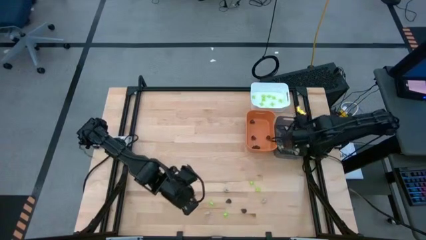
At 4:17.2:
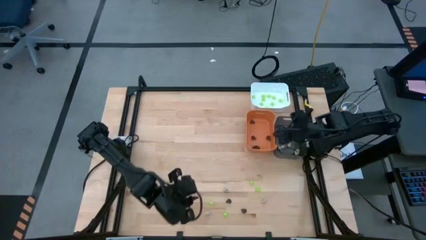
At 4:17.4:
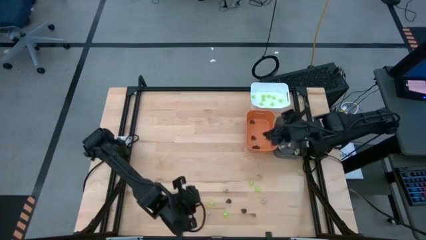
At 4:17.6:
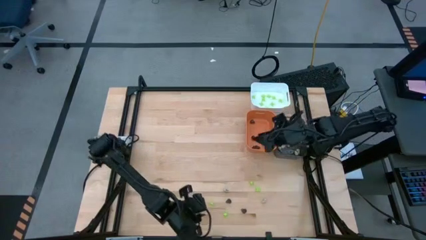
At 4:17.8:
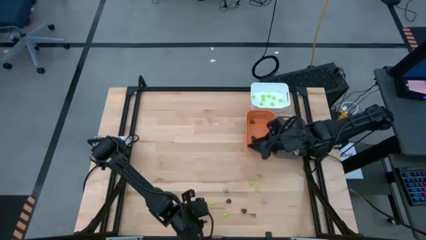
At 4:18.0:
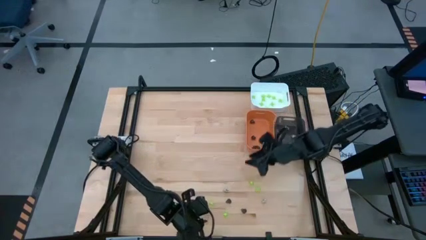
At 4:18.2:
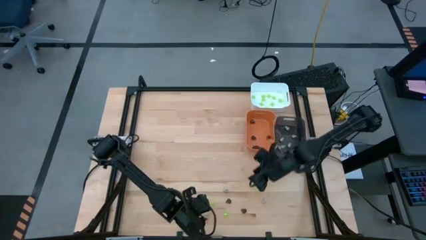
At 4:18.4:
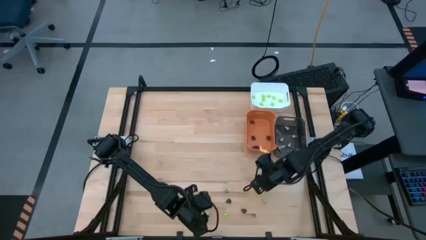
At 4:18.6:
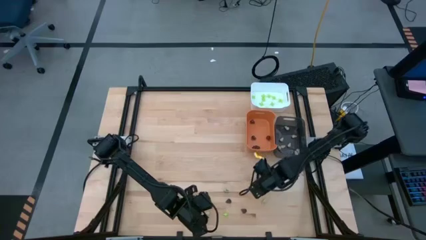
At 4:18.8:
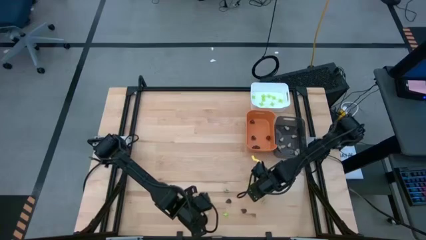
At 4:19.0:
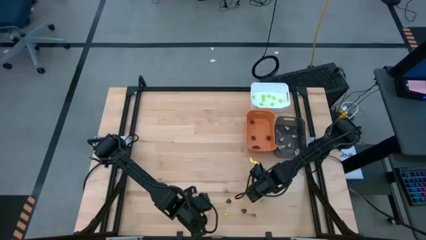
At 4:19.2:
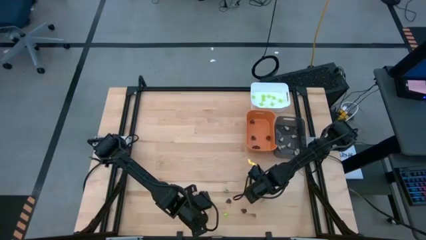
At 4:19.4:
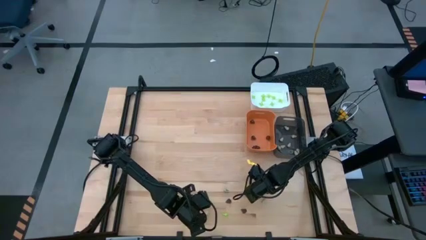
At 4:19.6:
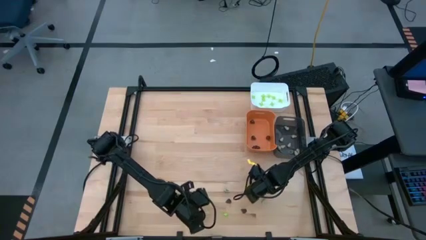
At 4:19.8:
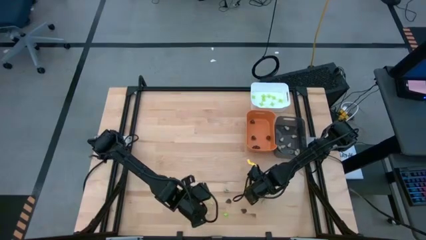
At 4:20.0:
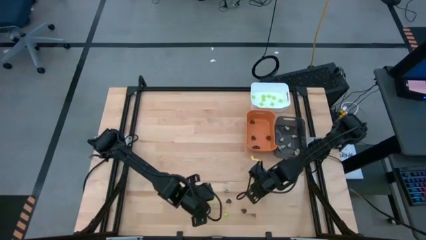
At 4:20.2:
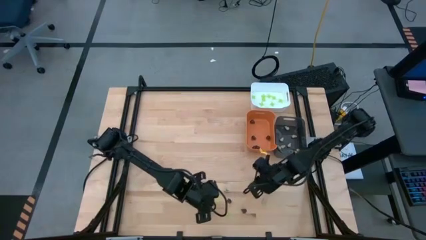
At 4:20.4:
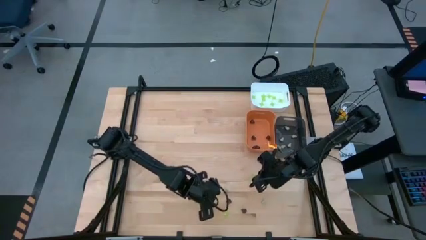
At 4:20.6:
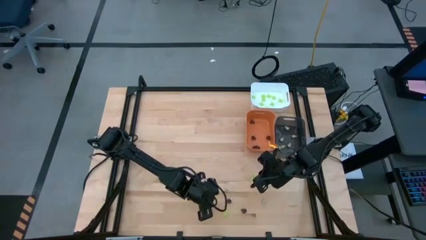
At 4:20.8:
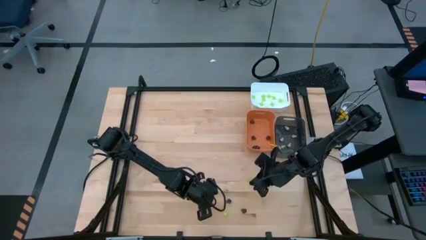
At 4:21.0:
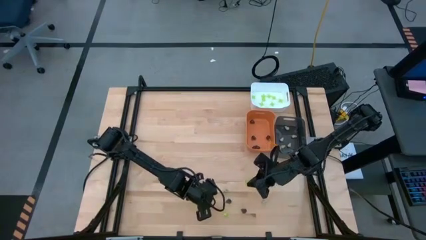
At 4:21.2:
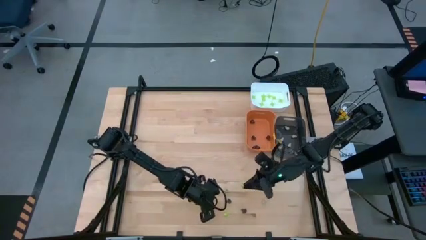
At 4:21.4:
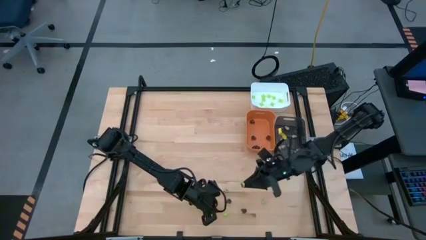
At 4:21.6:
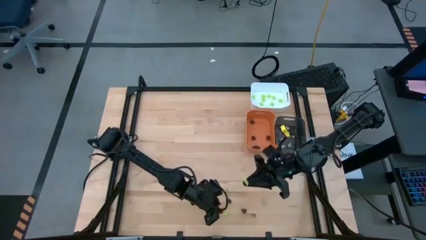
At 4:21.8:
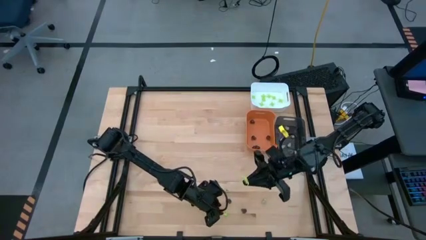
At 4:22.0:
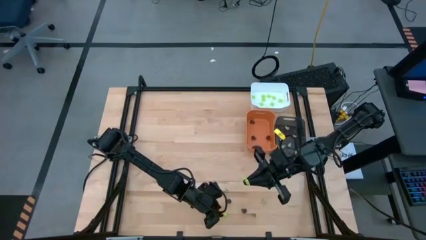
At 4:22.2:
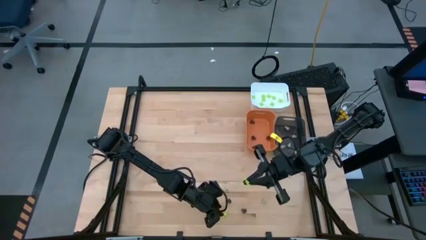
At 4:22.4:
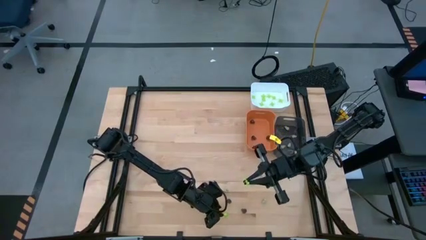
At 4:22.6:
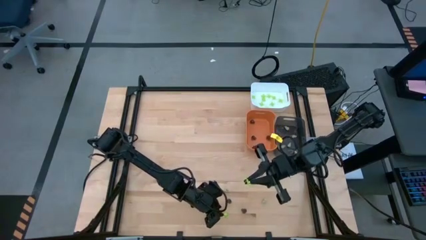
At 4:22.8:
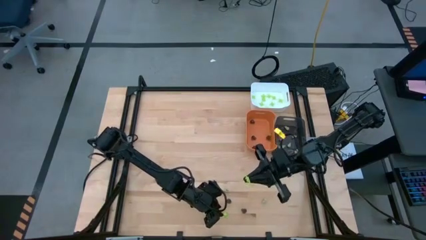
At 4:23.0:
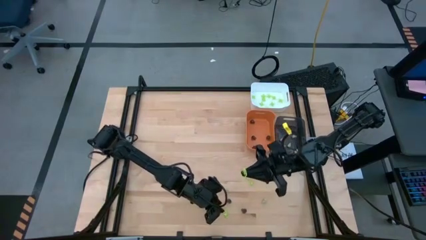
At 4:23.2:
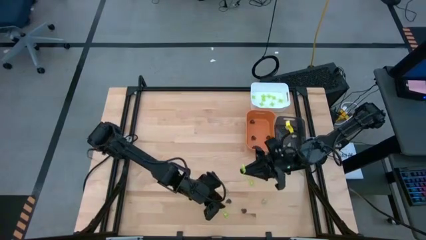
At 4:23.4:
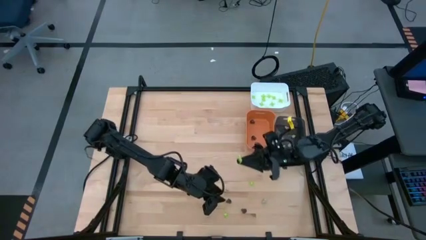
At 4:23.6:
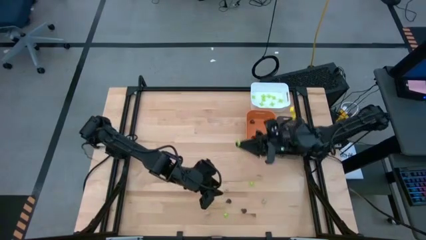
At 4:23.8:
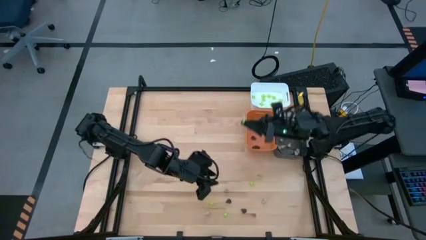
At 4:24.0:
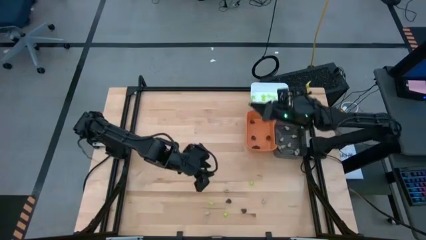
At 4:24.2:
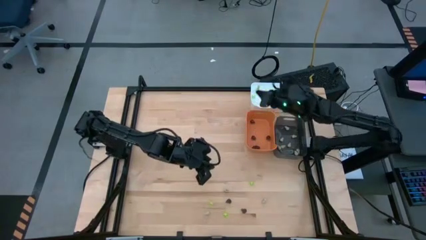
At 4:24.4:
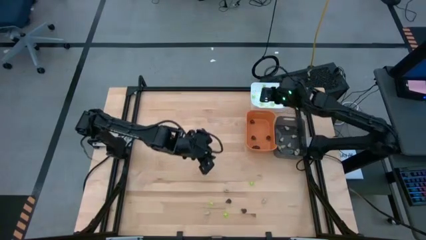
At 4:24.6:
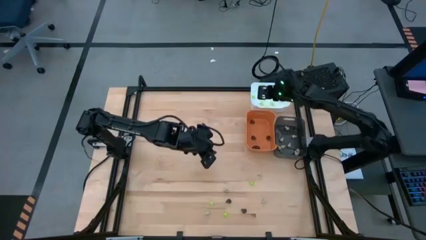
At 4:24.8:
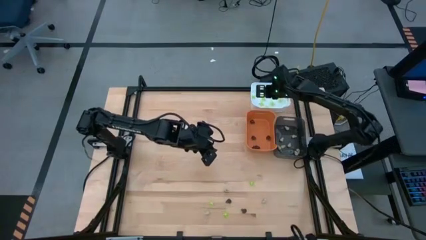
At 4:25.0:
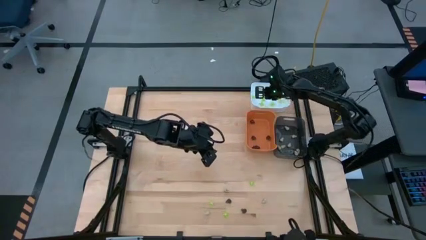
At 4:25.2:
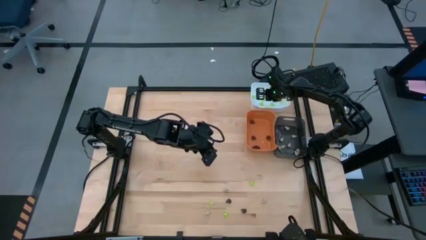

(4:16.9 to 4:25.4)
Task: Sort Halloween decoration
Put the green spider toy into the white bin

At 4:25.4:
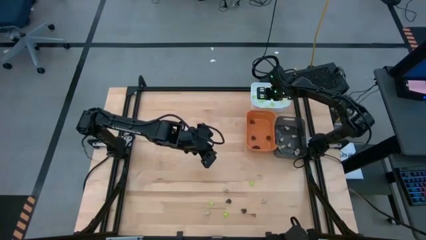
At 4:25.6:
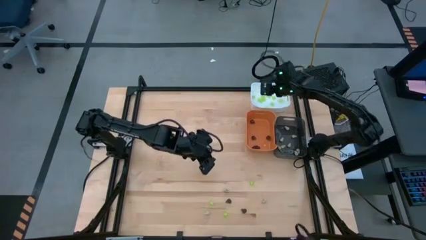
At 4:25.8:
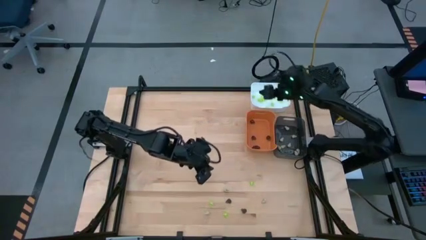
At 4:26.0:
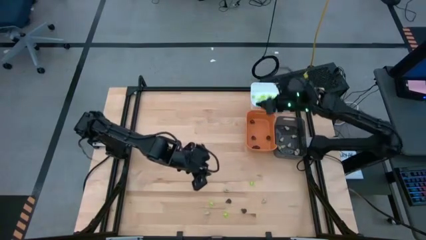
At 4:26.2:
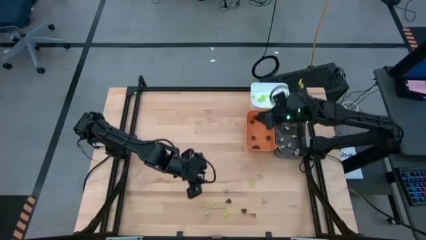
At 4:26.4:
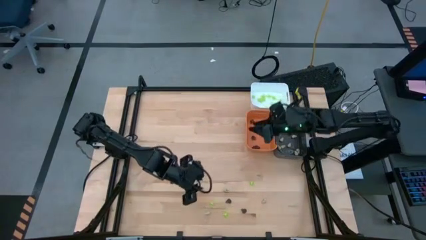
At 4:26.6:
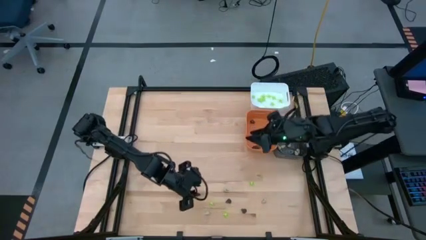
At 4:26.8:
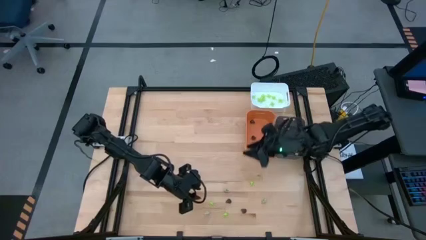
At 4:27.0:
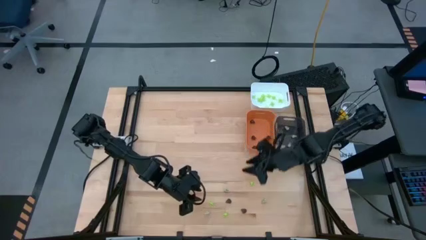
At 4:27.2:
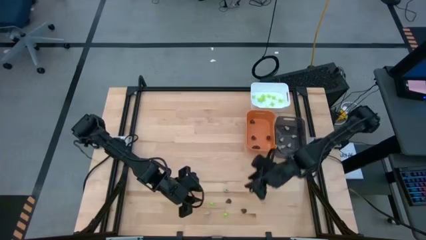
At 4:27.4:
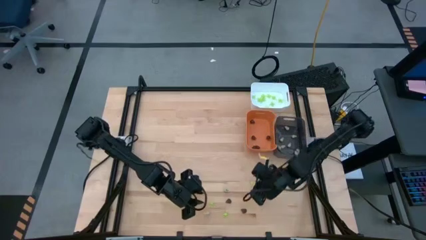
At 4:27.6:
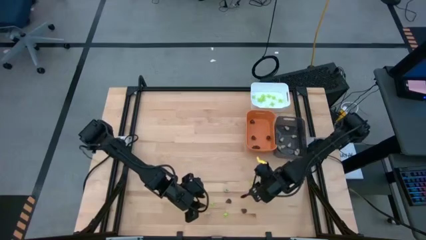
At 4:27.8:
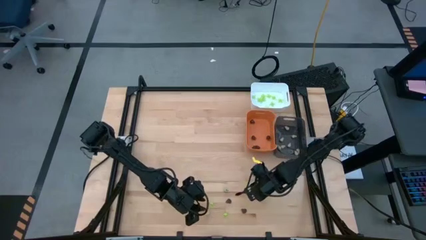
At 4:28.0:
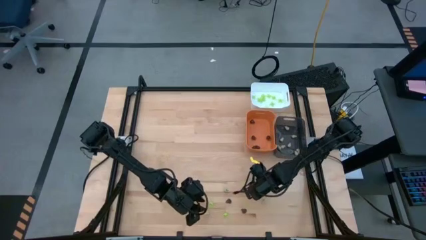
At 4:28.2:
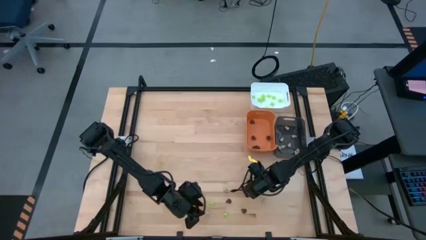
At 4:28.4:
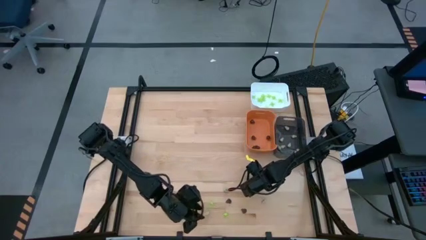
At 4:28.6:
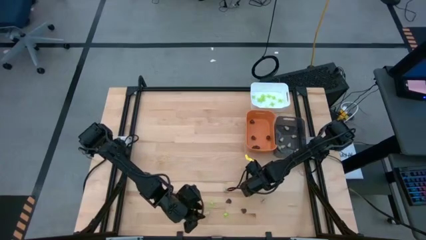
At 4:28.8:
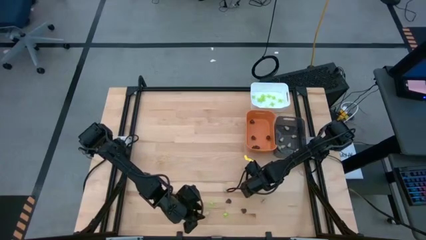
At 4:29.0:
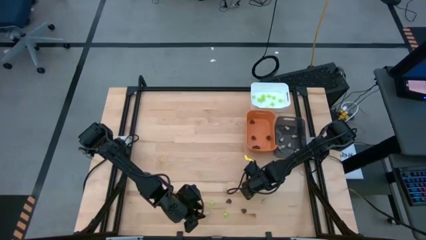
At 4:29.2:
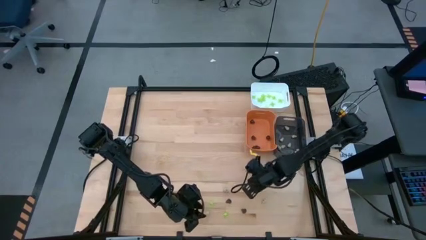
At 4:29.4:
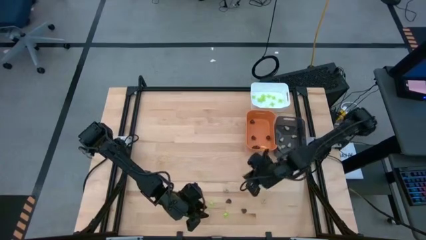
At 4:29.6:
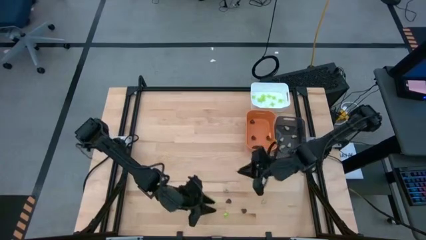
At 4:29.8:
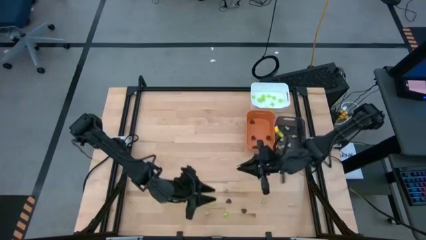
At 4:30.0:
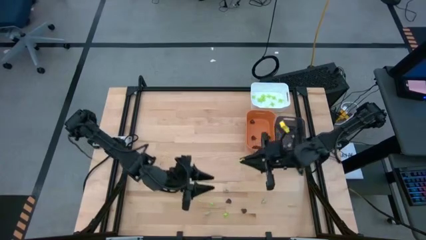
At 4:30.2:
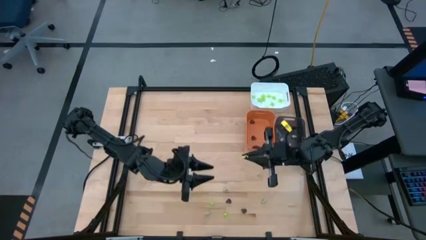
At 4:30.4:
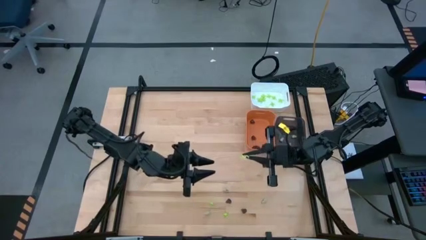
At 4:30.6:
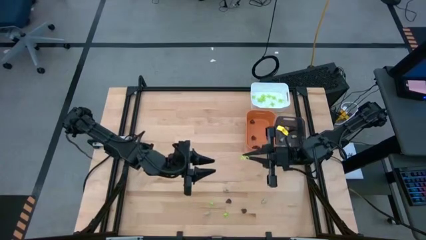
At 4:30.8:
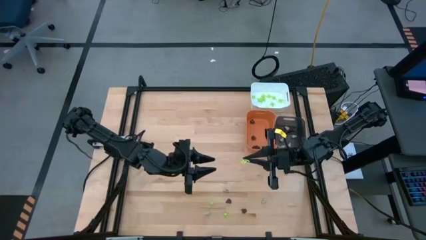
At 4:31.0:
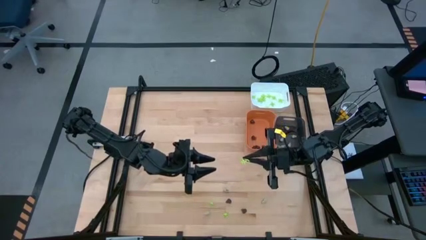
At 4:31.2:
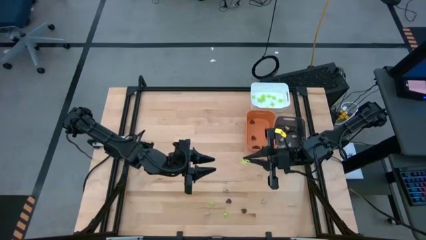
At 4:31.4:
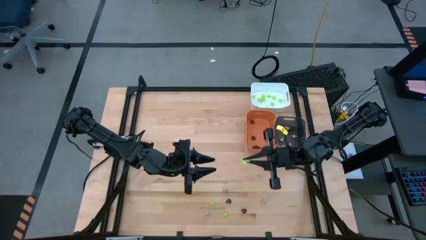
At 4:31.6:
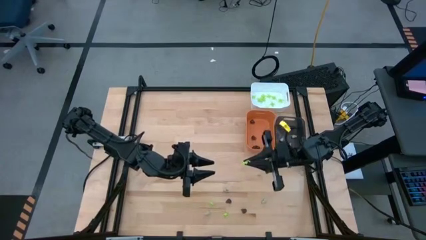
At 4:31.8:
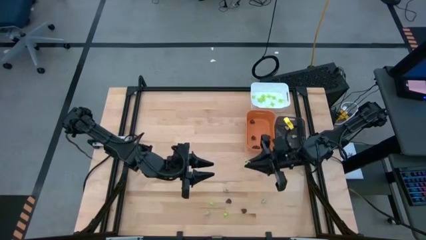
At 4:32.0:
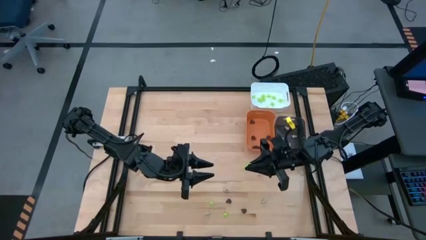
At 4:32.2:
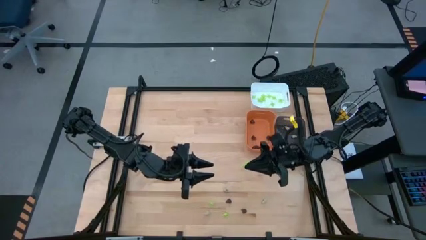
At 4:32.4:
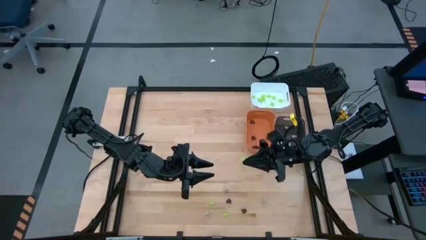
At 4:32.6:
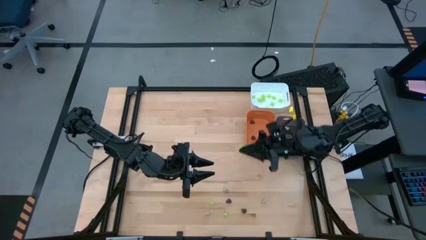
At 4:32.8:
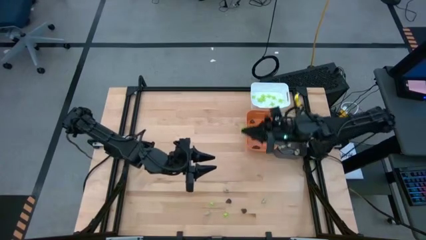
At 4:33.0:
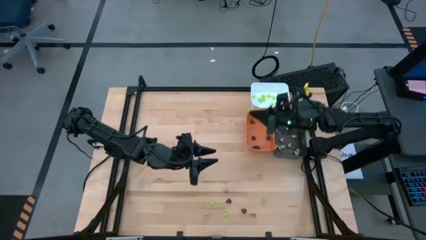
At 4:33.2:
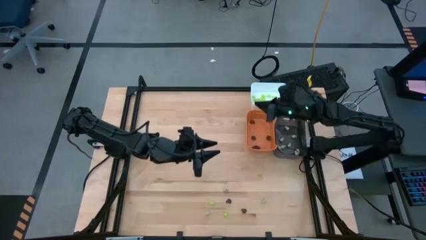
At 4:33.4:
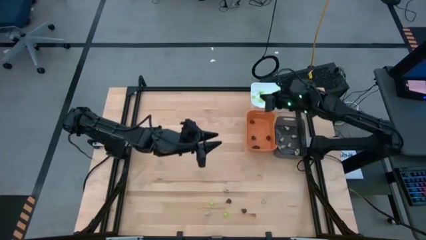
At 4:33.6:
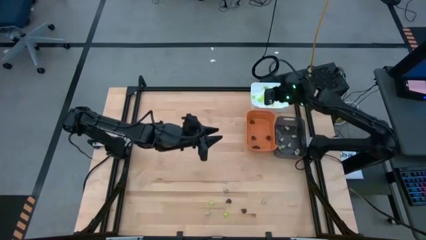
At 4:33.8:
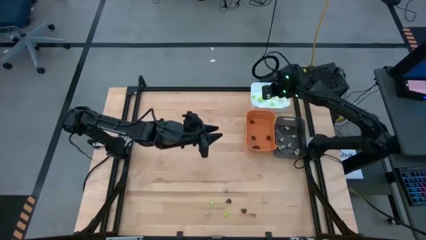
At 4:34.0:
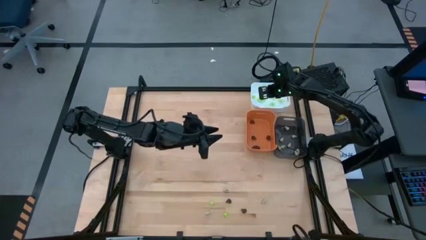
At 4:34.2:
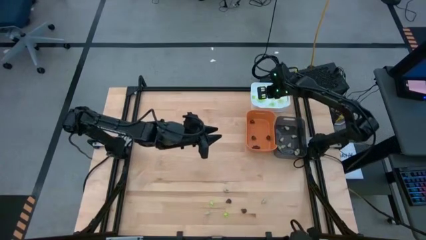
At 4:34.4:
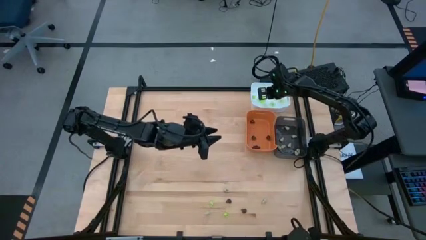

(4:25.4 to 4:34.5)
Put the green spider toy into the white bin
